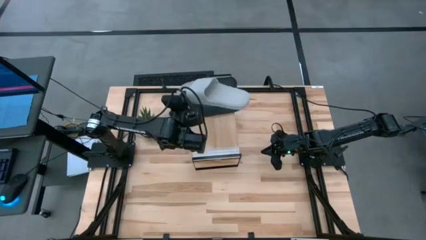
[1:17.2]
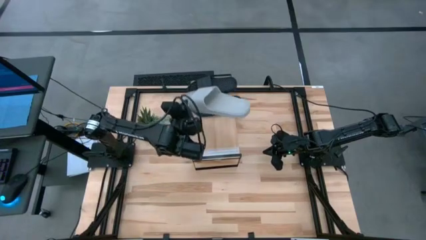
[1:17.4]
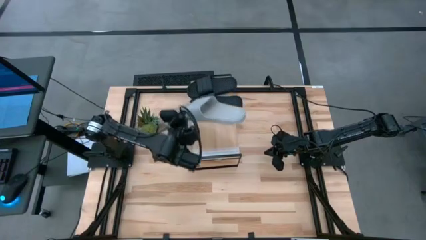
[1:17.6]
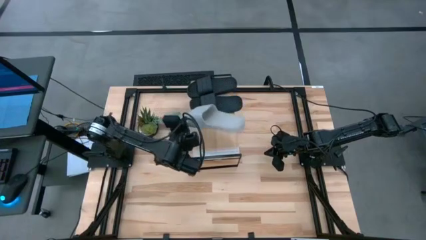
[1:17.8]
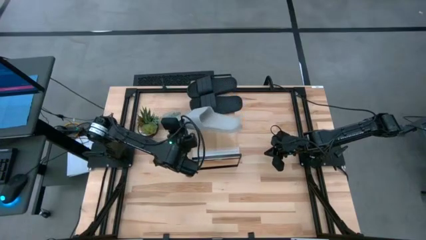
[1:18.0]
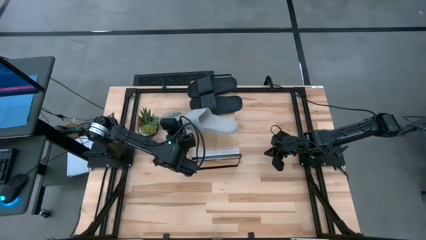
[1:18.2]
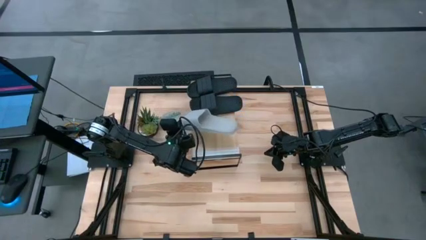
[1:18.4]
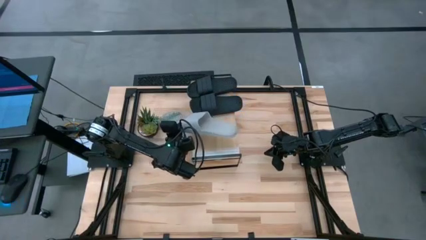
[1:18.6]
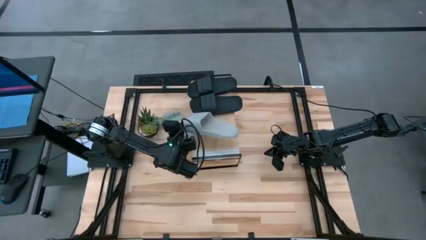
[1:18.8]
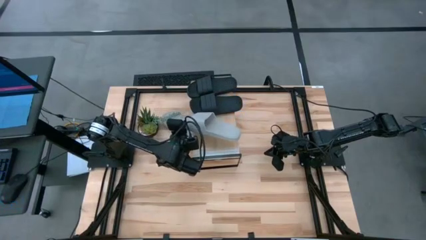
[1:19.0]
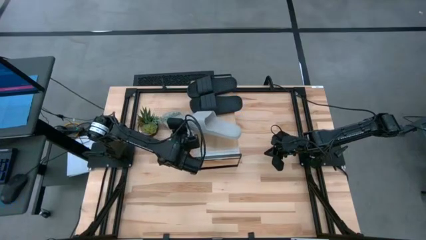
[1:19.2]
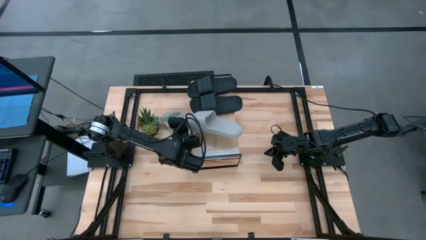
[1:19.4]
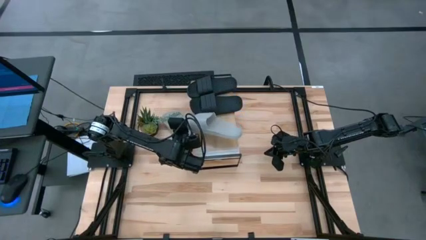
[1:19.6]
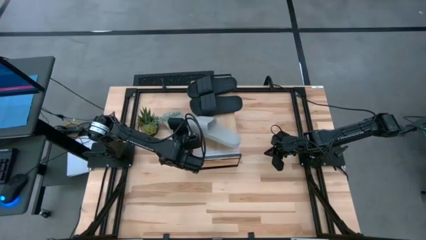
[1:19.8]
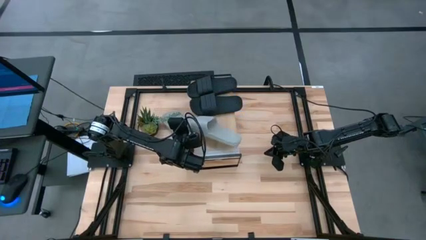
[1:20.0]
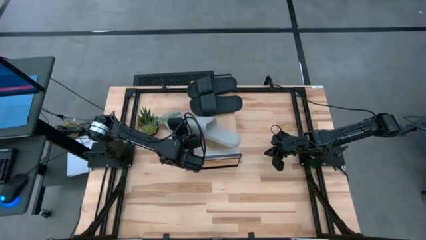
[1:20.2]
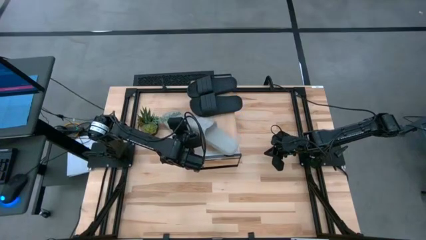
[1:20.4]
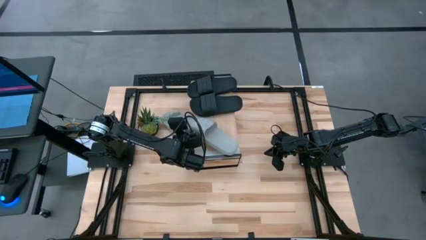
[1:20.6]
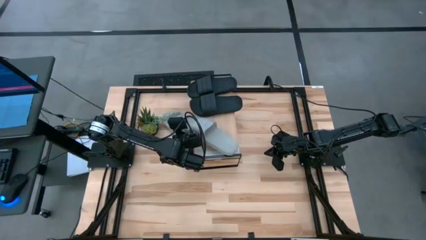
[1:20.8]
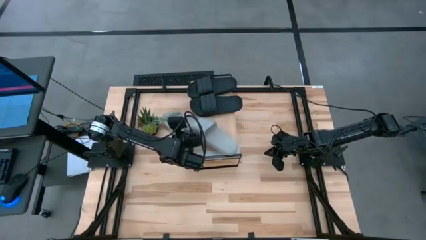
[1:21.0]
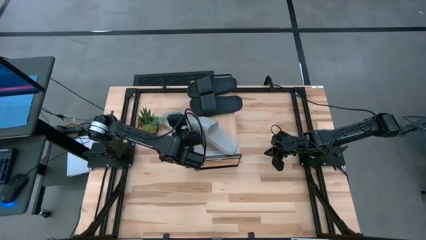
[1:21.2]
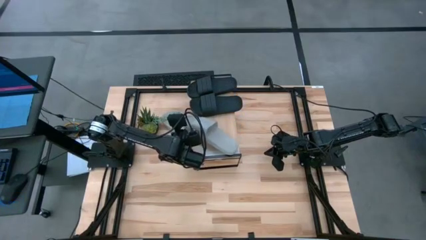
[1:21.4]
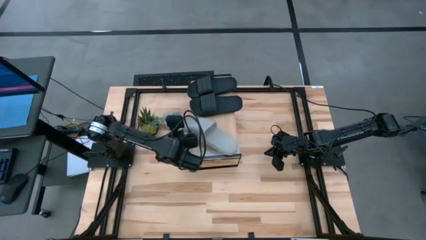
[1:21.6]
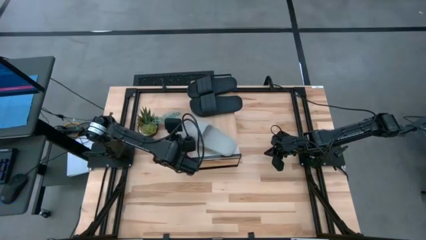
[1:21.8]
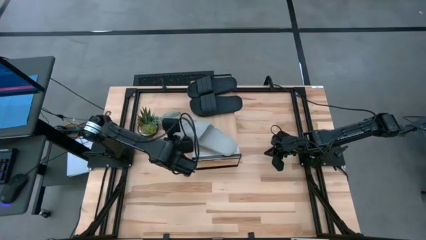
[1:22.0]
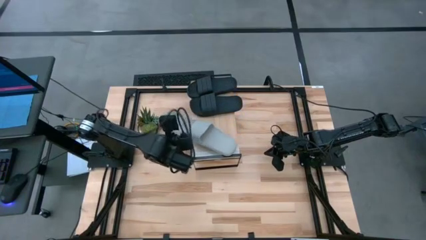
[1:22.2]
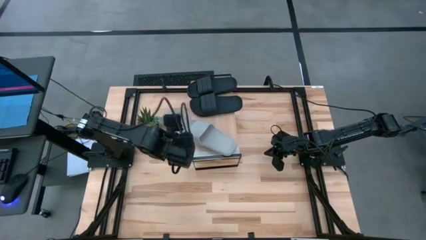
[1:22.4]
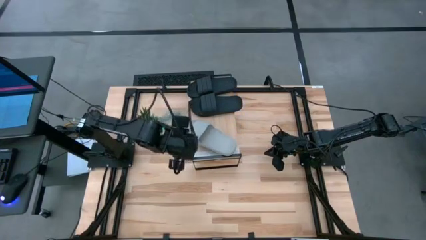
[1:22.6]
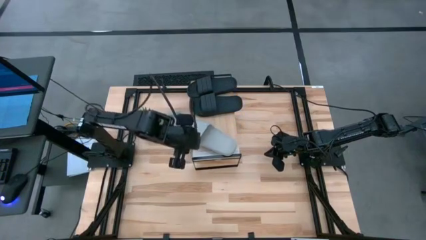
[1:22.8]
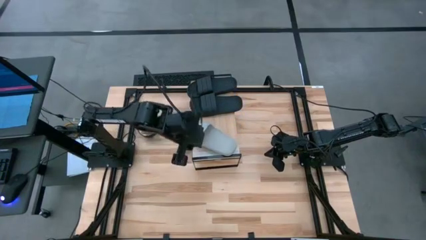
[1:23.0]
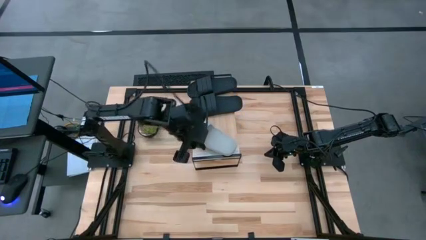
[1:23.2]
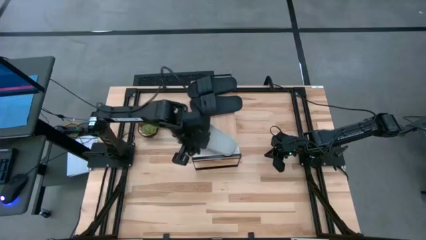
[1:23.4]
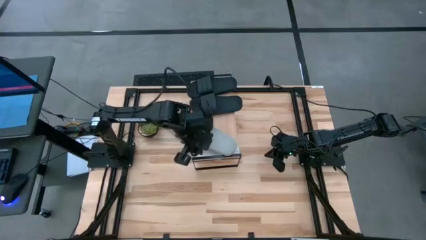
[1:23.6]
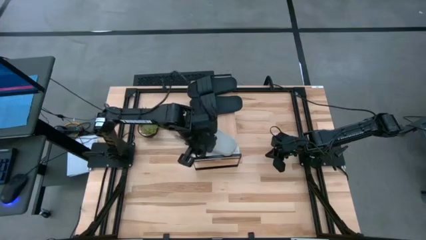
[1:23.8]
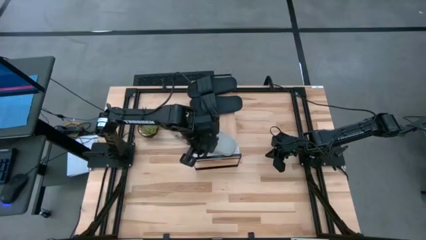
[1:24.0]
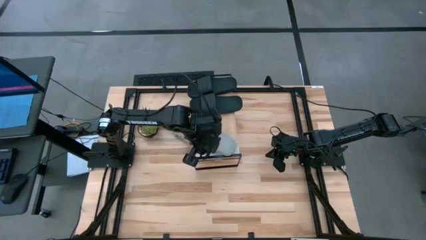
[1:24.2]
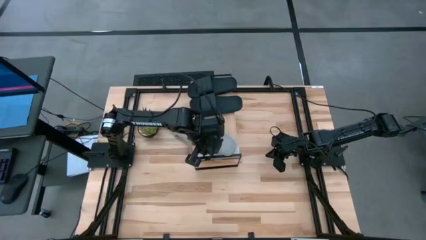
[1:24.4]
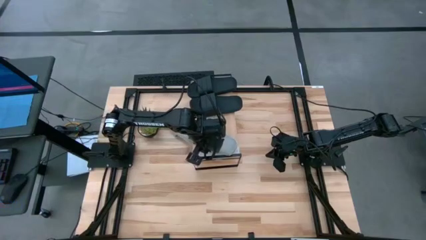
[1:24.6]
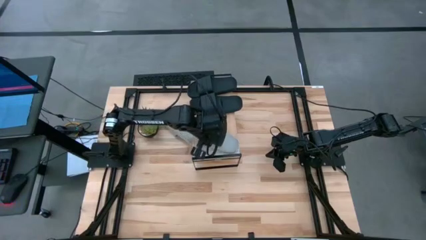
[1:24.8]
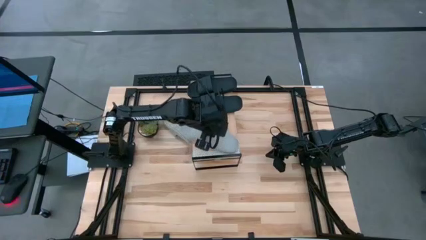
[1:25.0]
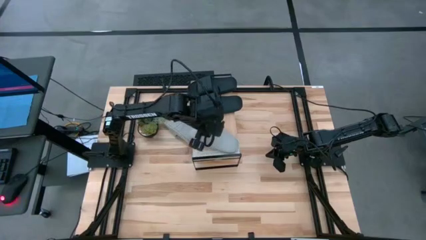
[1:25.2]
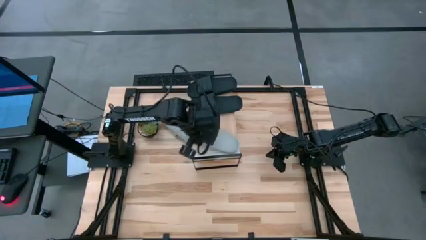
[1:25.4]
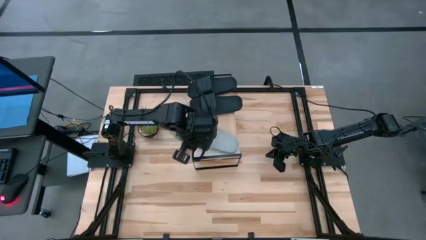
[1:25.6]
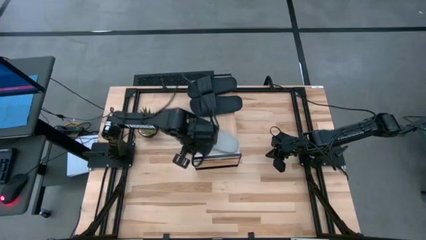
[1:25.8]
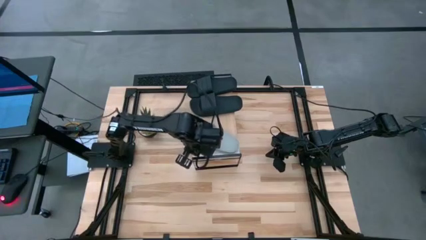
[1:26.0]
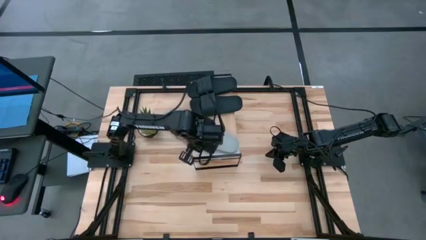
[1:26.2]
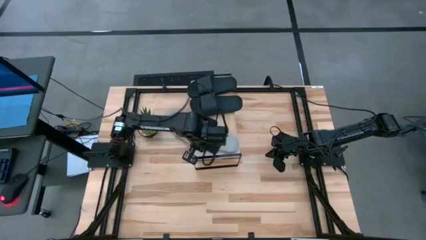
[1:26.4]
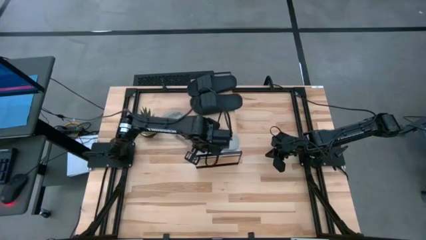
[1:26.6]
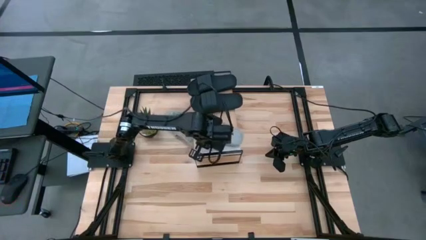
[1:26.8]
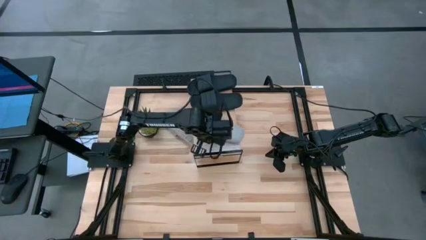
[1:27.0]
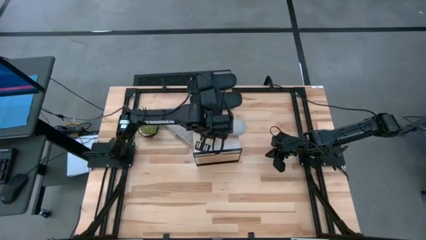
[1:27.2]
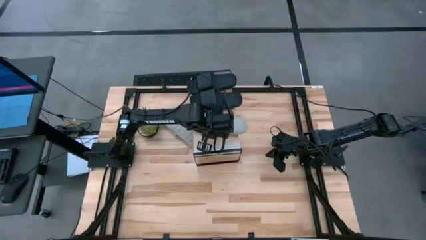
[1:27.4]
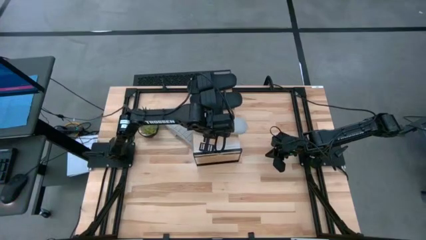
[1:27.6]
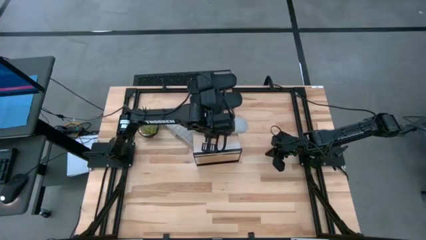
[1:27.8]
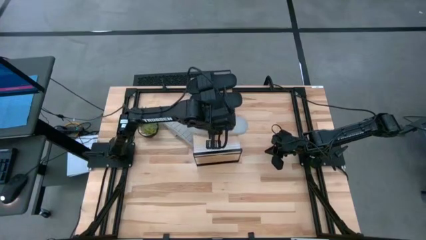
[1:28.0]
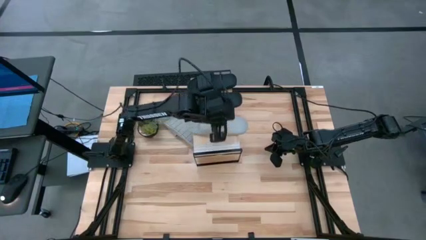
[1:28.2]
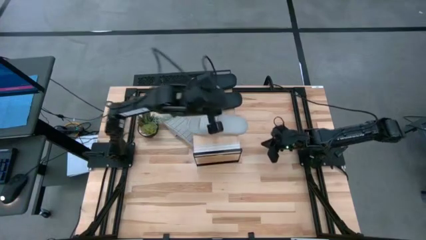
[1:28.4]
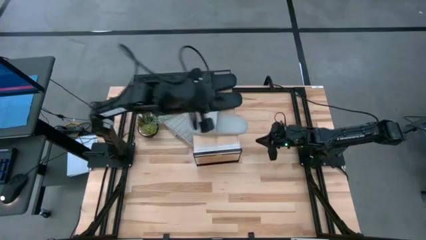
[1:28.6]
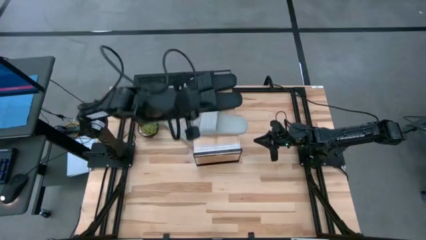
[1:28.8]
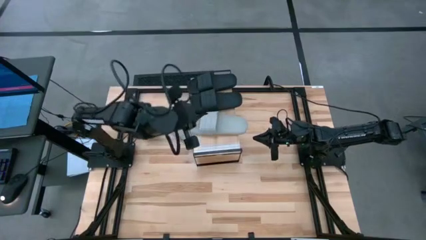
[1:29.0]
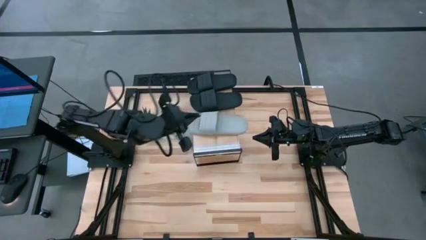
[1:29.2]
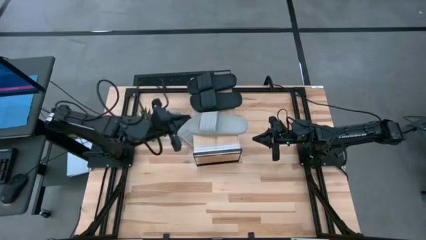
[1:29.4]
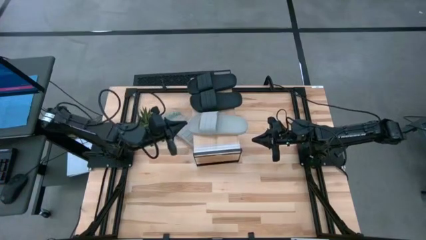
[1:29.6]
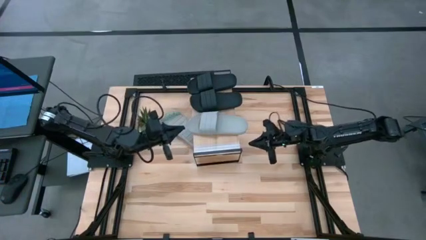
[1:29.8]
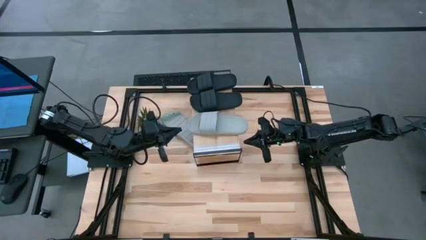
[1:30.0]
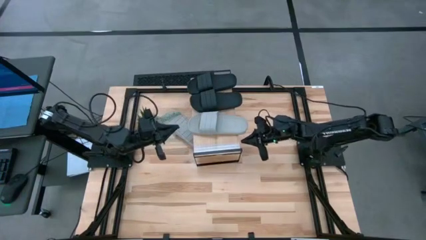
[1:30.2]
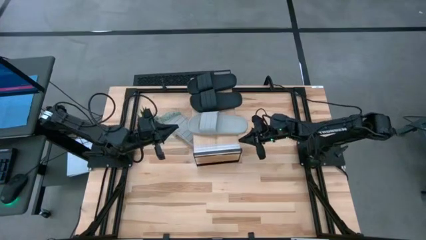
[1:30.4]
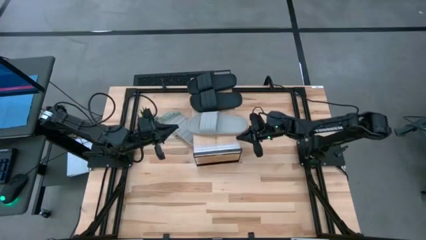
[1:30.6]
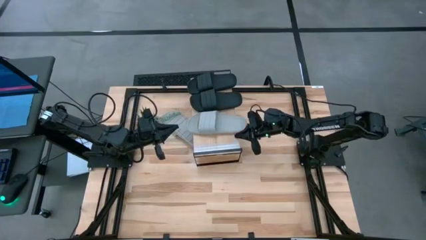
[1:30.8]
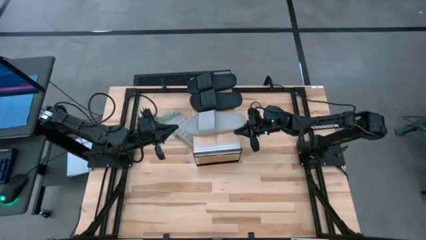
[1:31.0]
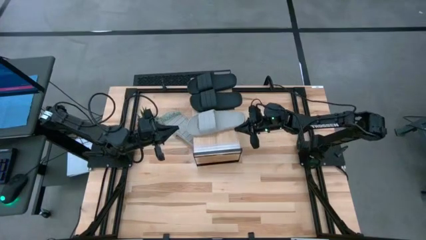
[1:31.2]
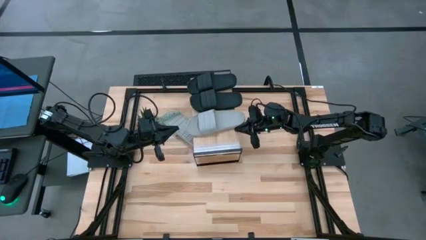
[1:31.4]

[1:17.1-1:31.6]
Task: Pick and place slides into the shelf
Put the bottom gray slide on the shelf
